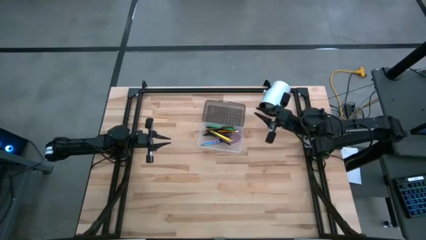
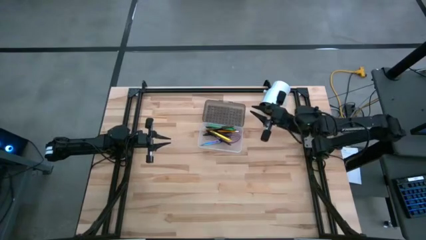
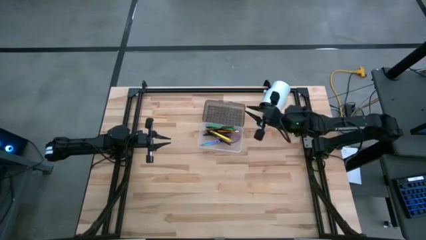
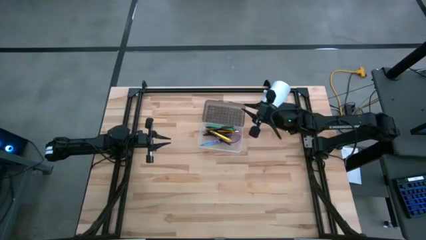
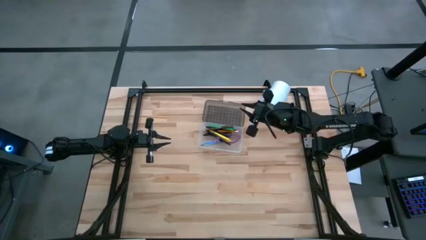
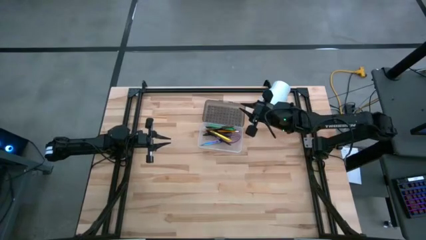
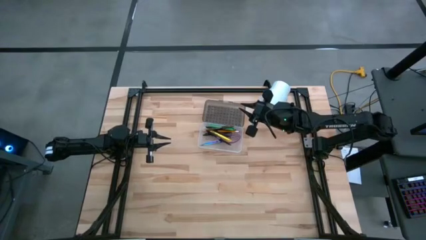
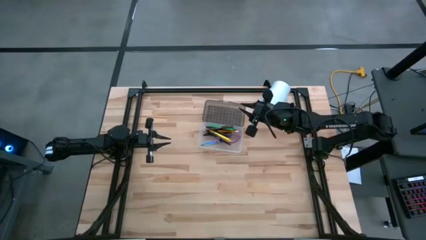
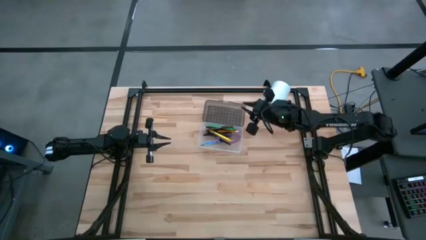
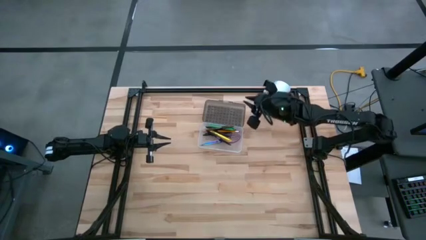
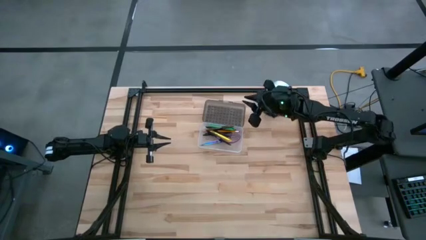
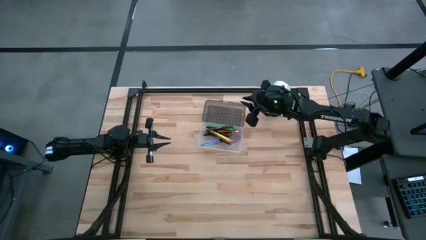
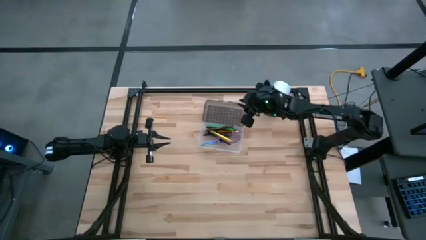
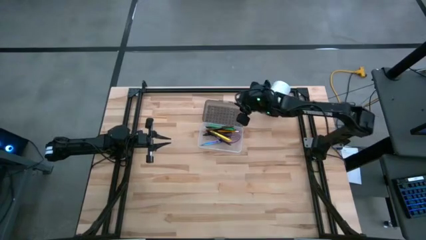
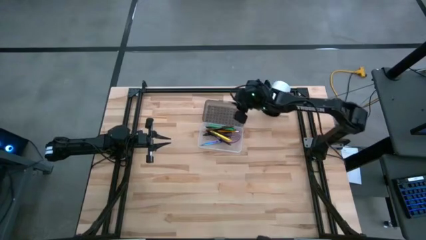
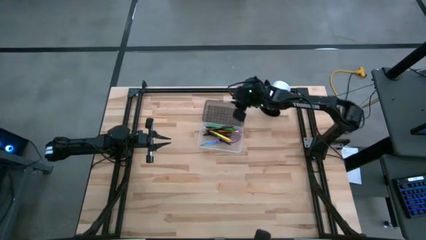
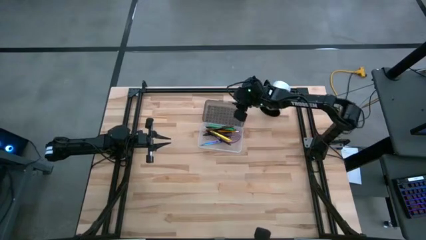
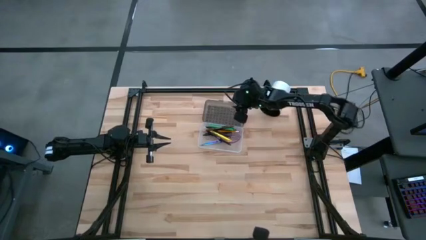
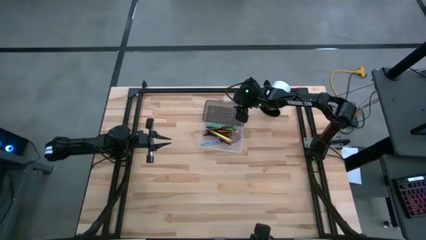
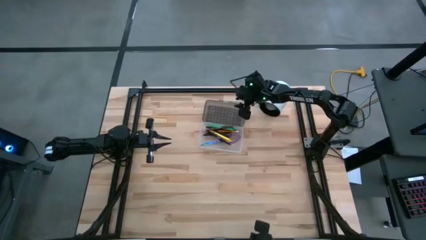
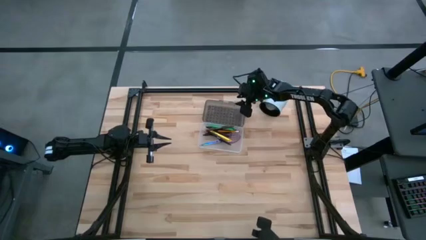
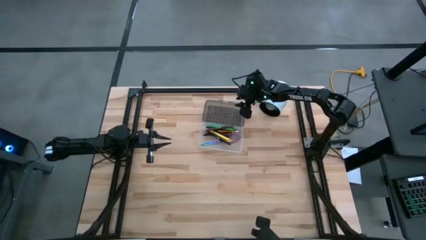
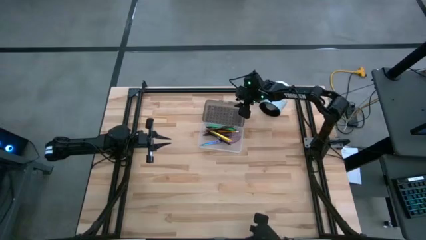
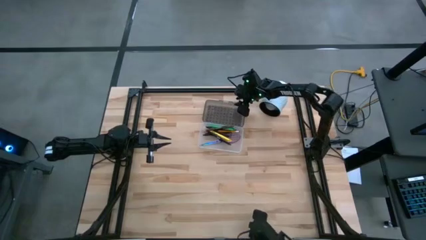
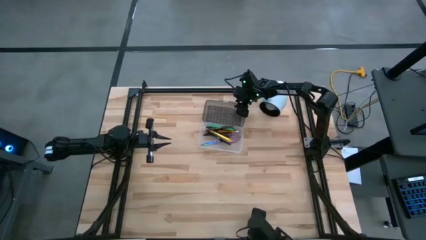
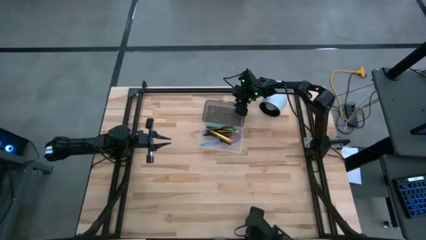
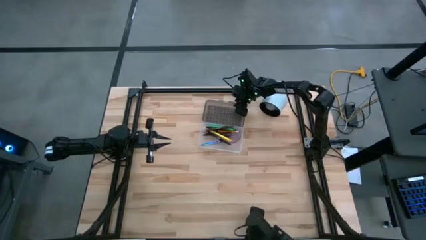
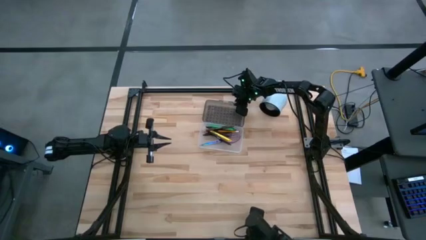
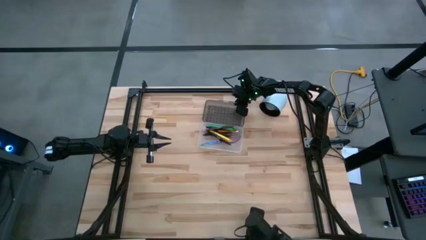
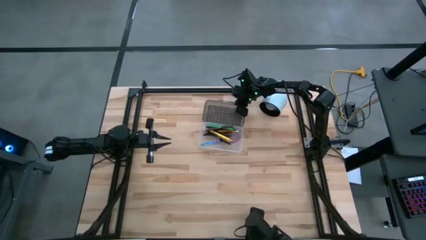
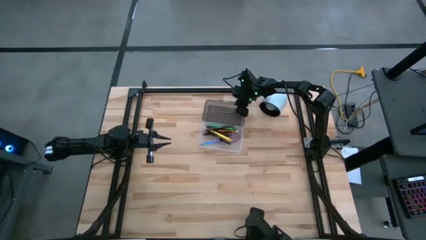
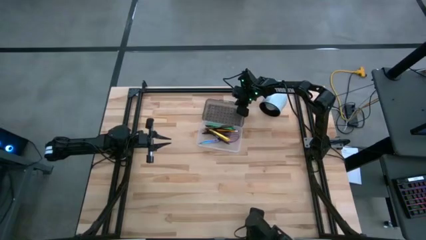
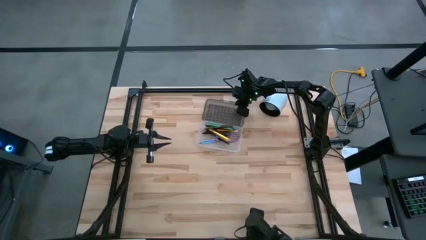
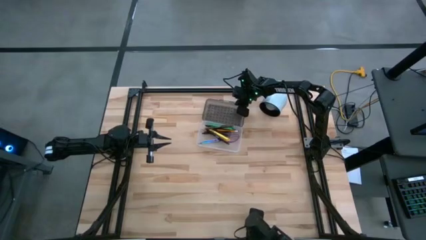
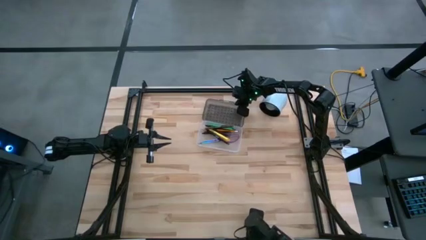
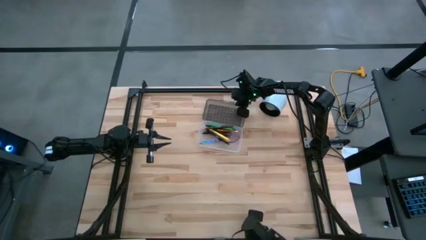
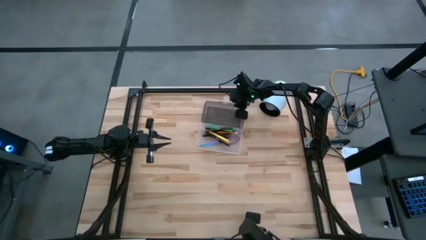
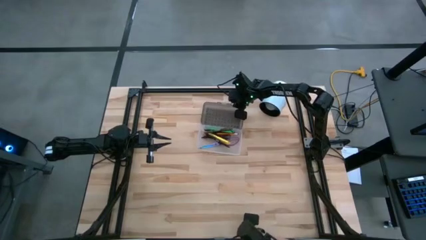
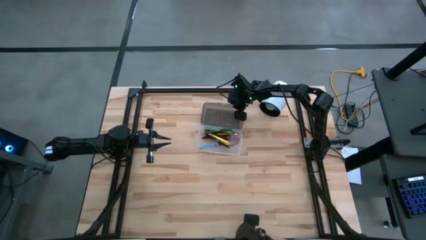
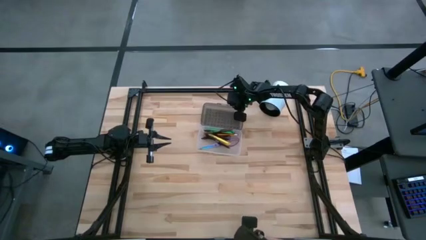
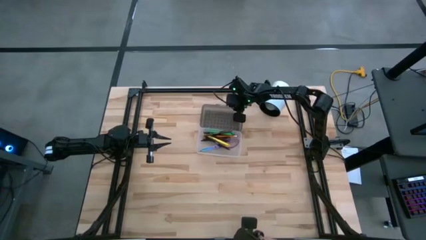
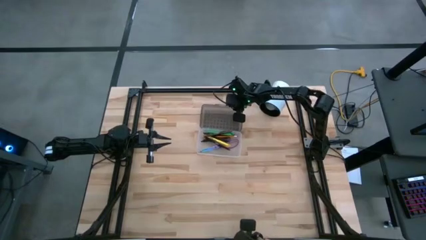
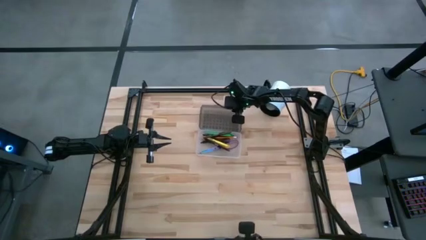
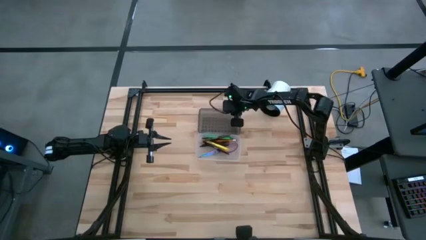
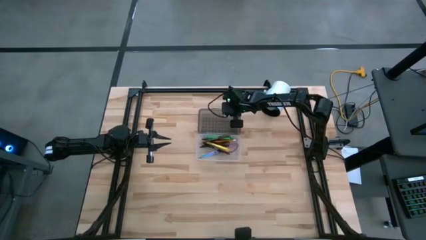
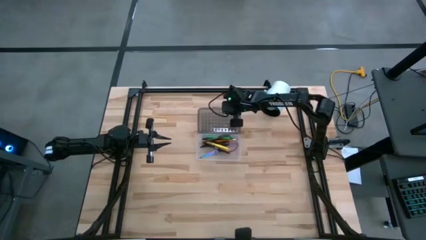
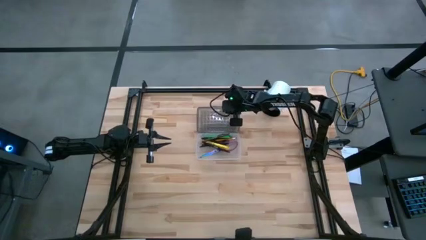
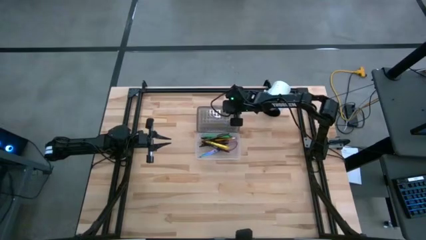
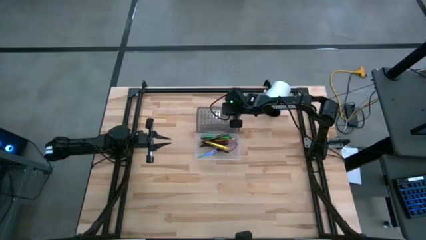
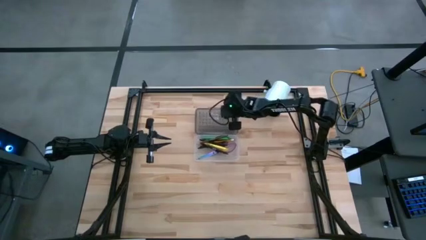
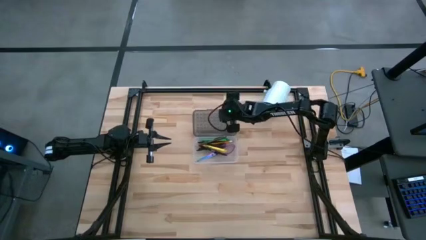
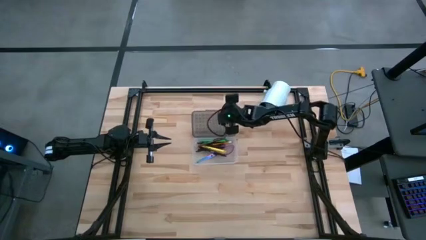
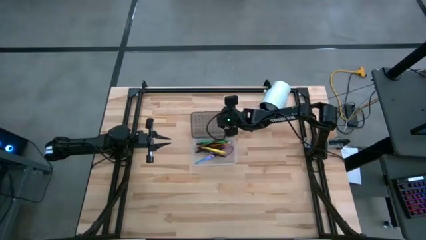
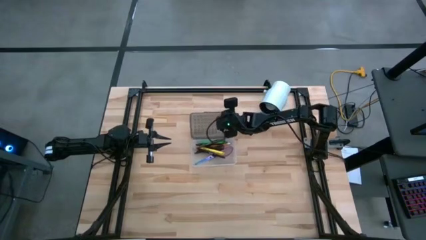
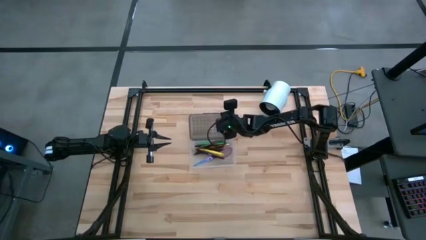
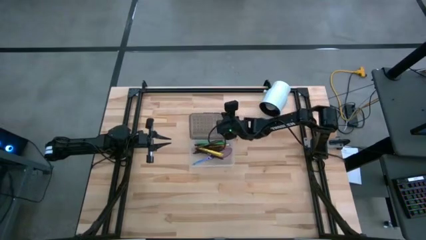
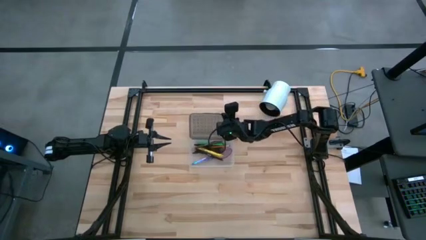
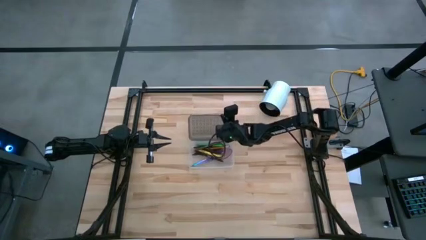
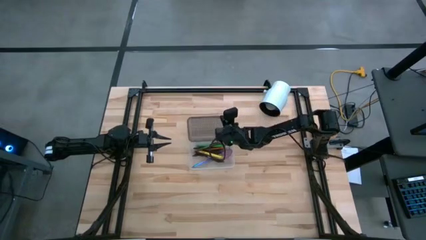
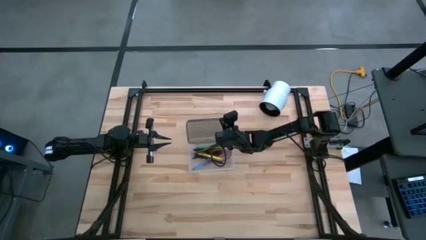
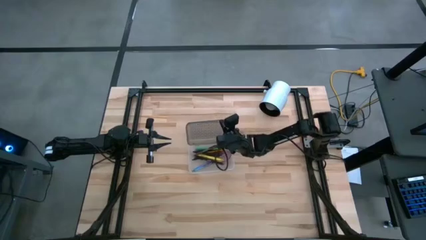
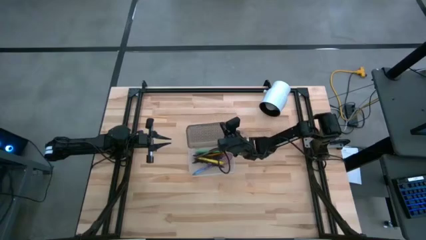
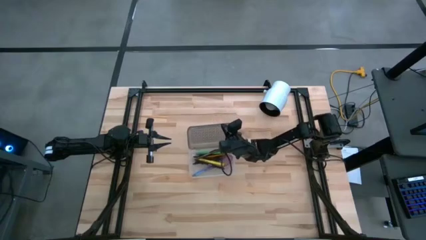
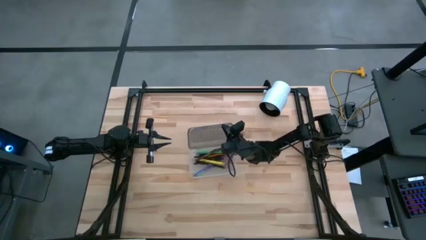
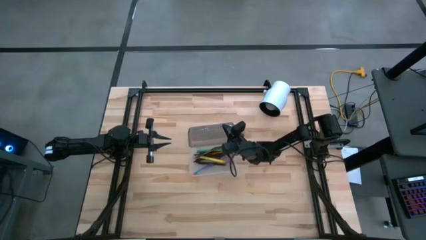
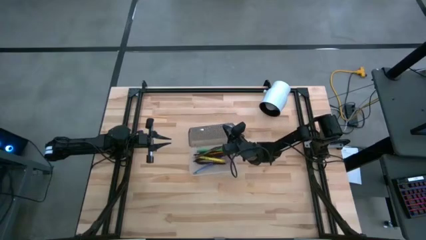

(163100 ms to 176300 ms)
Task: Pick & place school supplies into a supply box
Close the supply box
